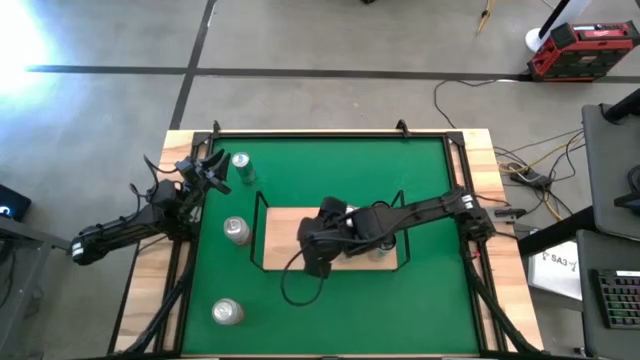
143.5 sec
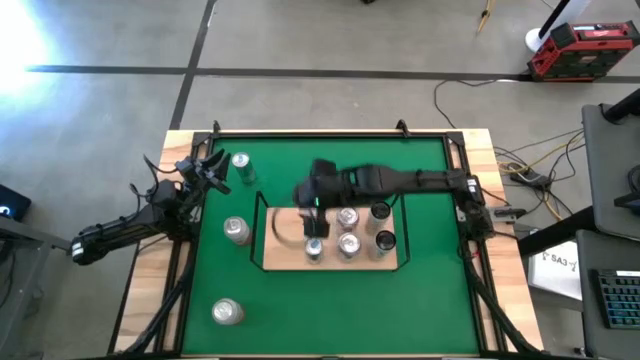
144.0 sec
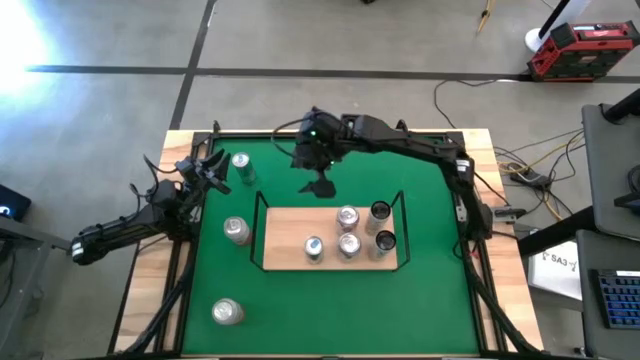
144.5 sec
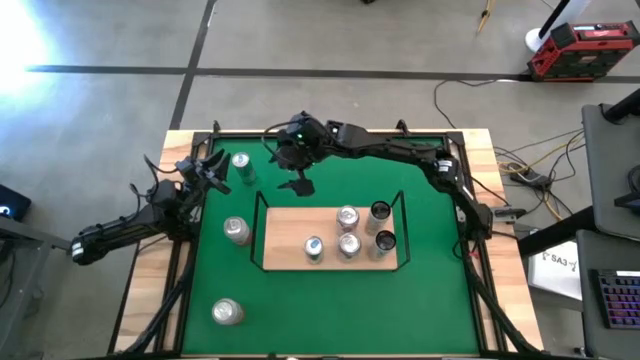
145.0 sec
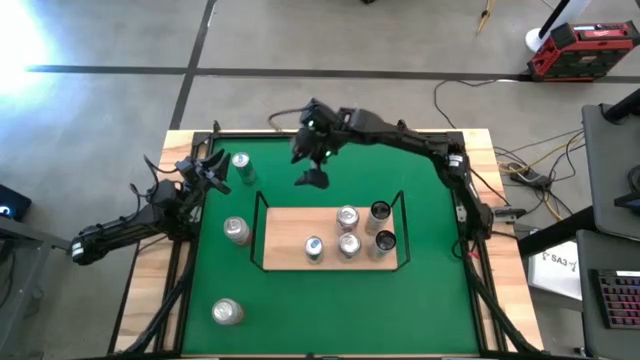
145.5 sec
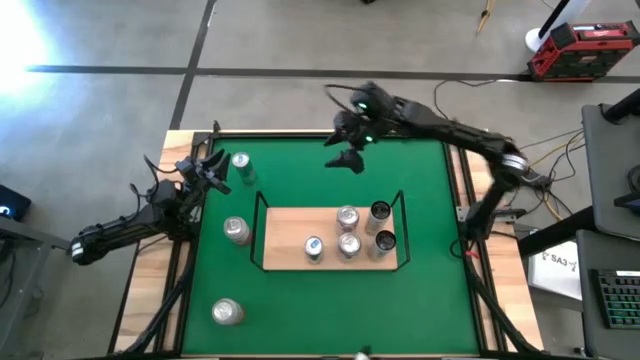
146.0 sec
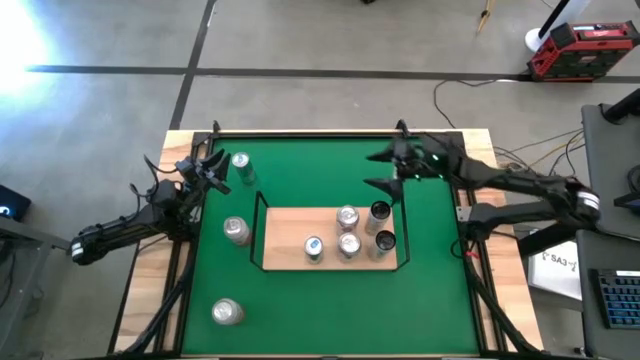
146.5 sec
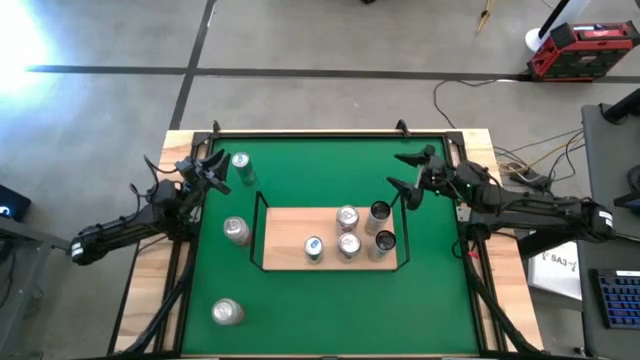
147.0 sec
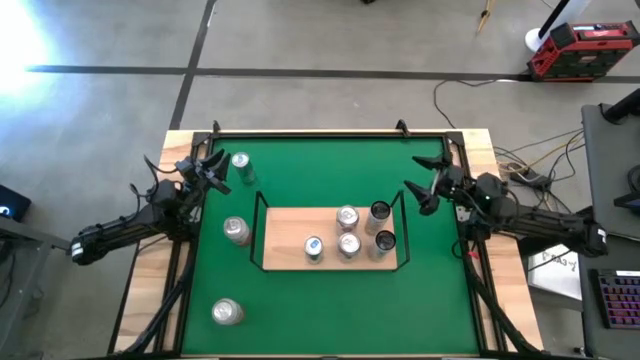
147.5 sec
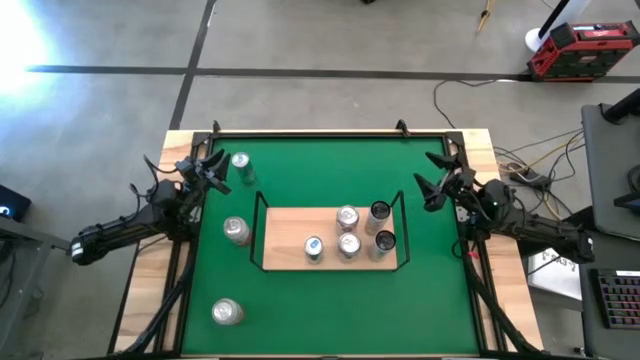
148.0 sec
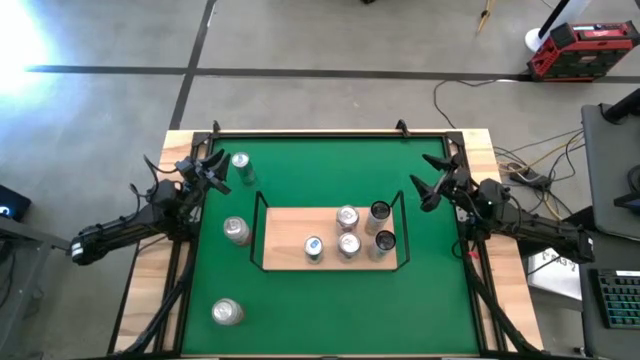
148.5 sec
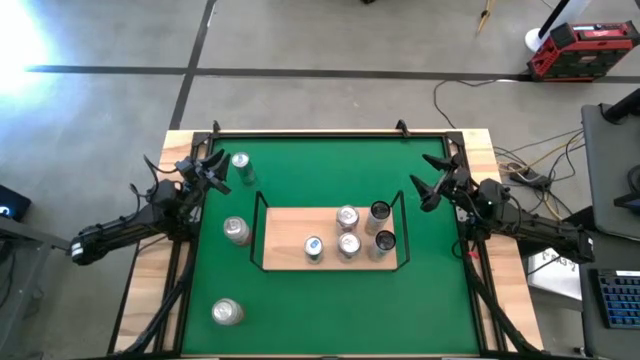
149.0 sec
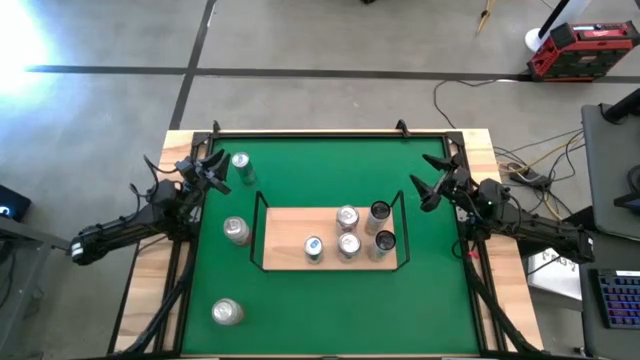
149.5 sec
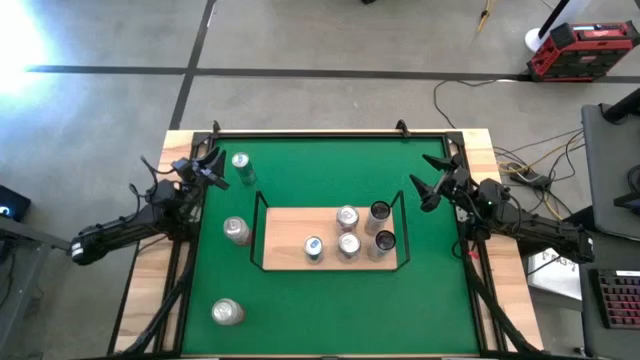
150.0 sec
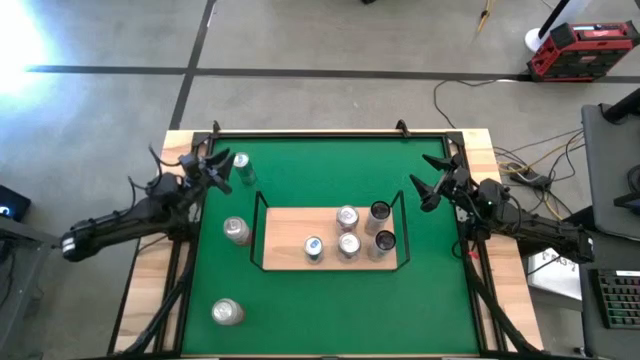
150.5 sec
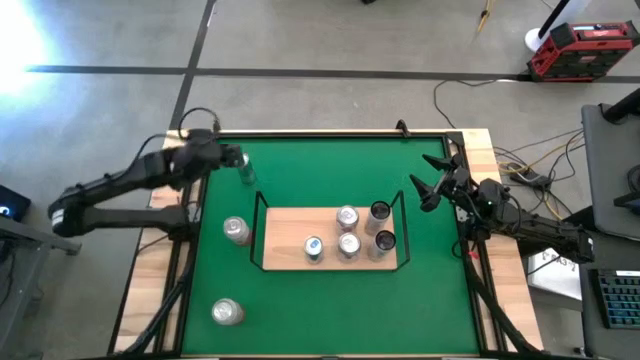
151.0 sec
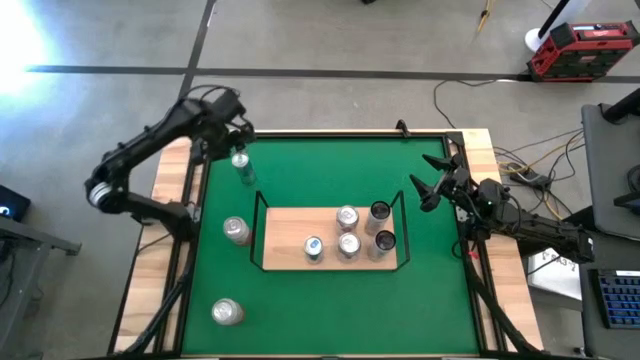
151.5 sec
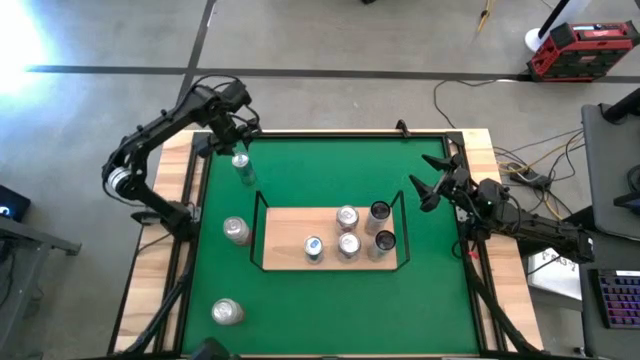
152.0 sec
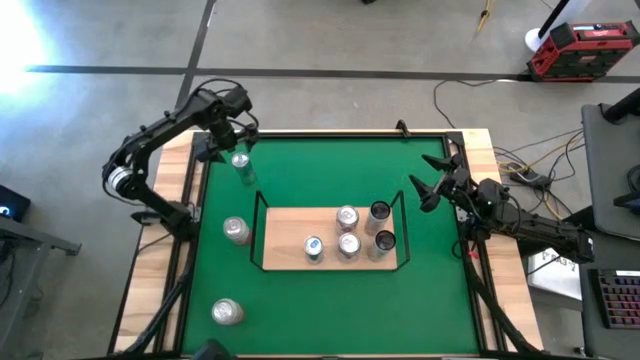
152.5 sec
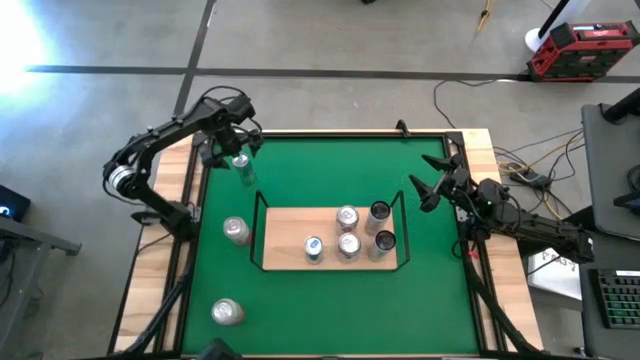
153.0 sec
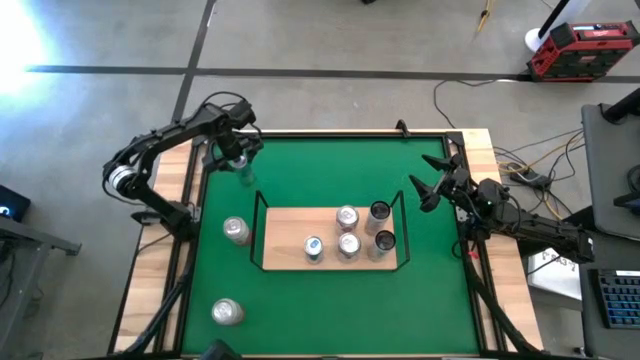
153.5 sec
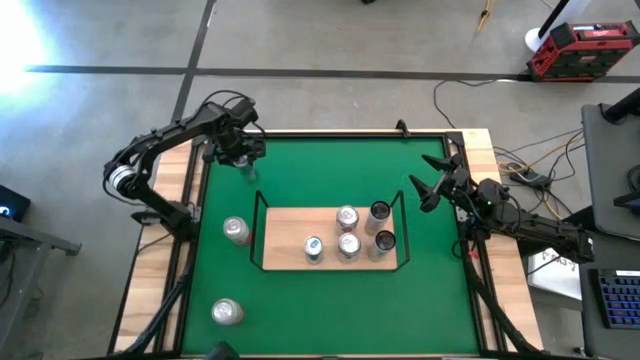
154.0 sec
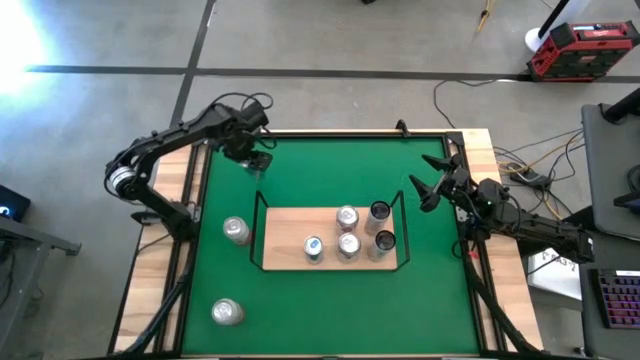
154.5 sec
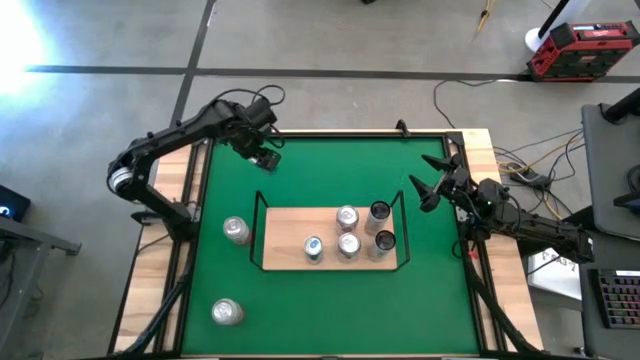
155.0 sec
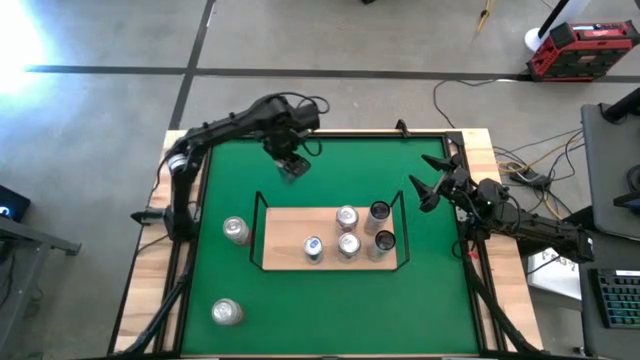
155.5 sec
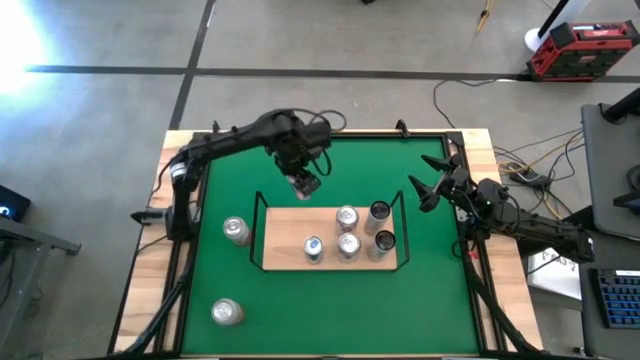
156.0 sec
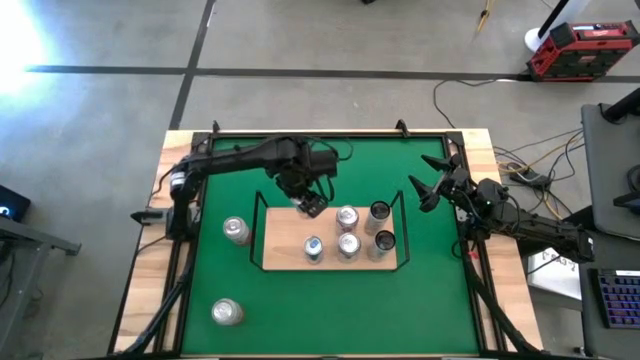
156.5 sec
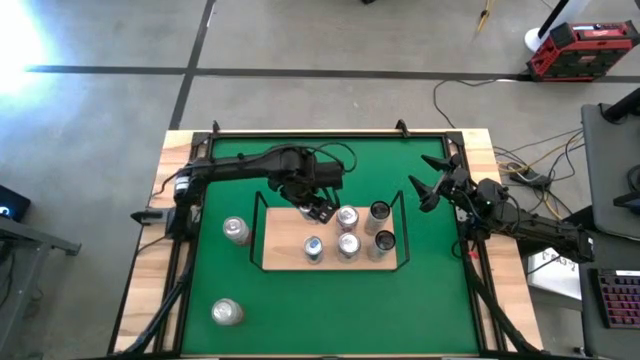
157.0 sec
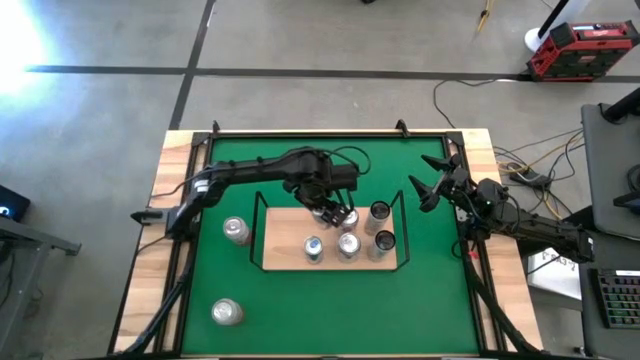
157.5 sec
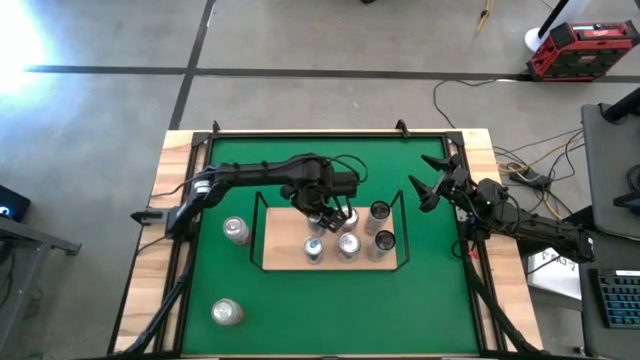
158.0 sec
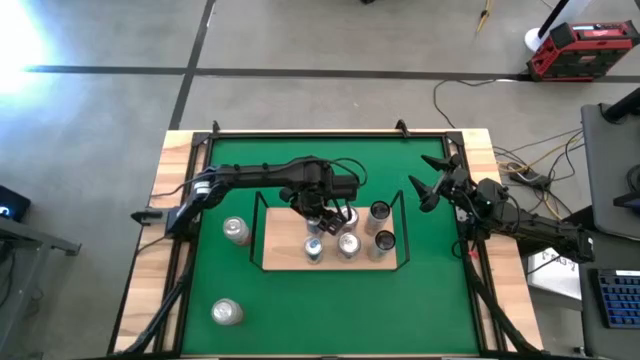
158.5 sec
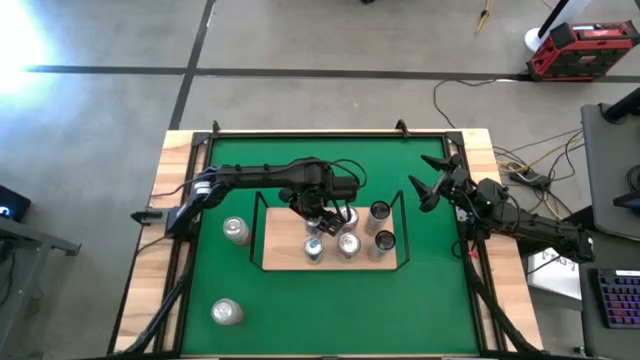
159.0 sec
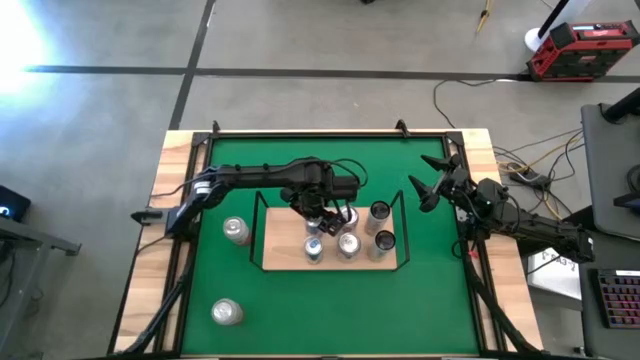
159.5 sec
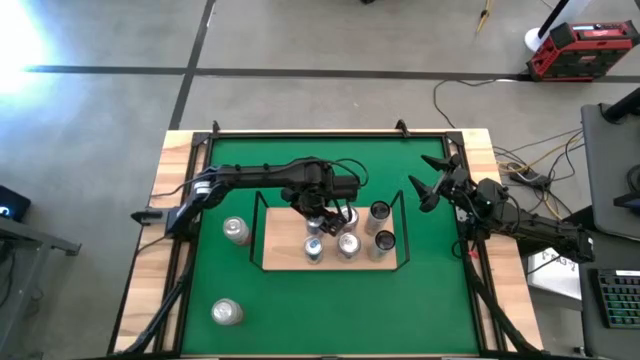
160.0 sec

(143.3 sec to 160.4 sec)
Task: Place canned beverage on shelf
Put the blue soda can on the shelf and align with the other blue soda can

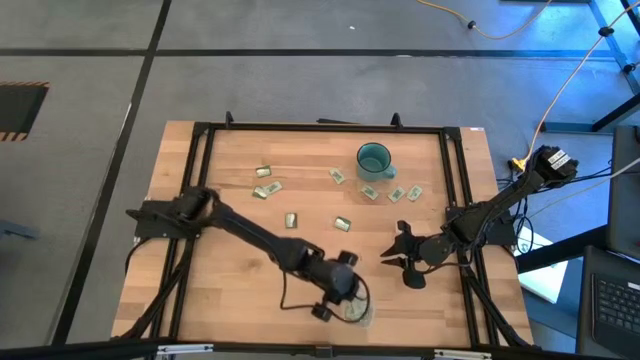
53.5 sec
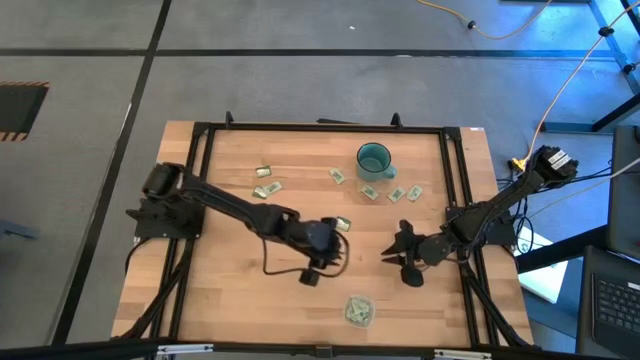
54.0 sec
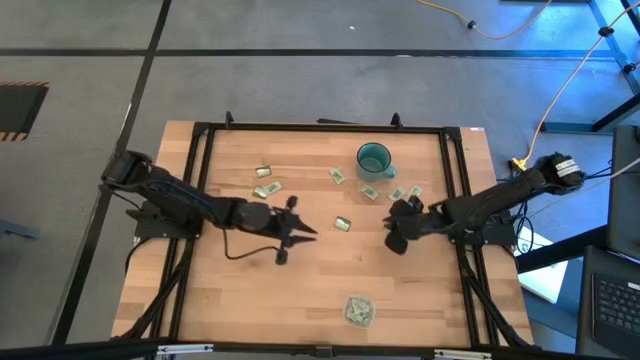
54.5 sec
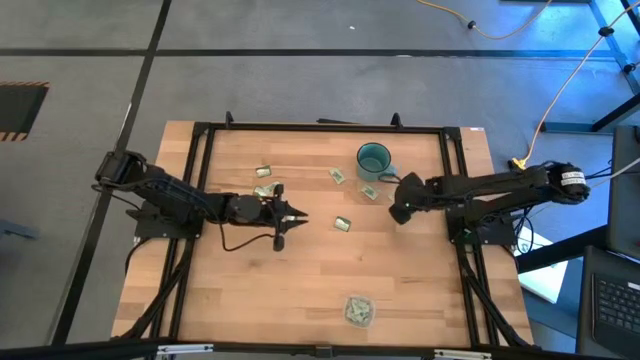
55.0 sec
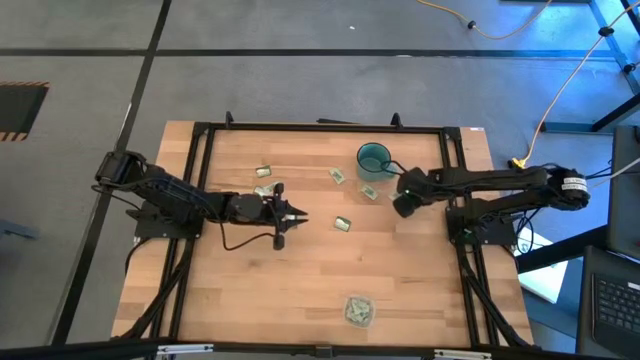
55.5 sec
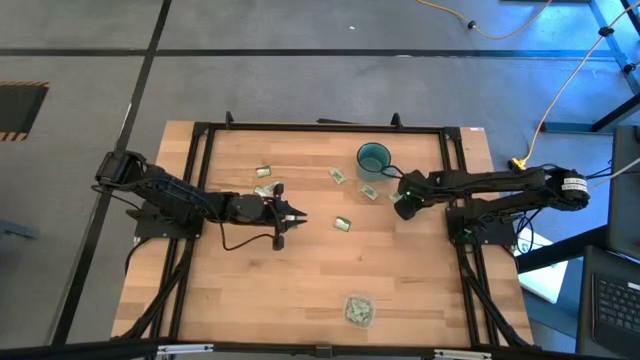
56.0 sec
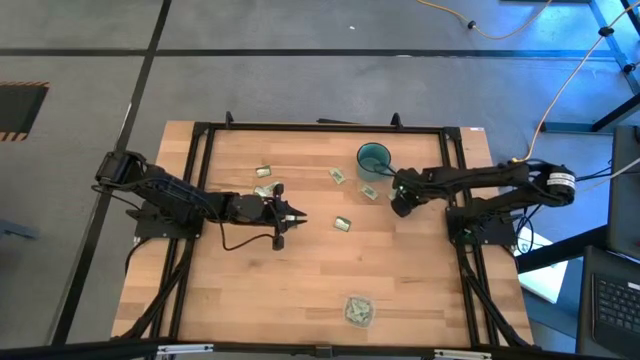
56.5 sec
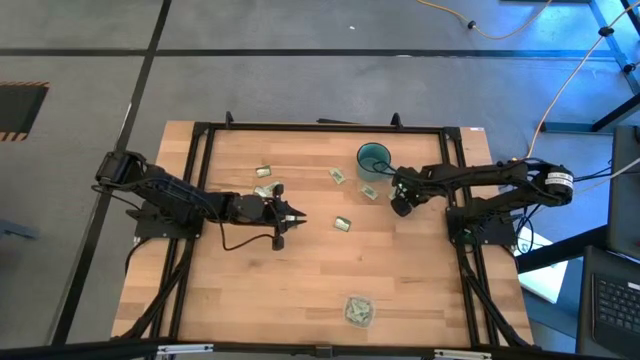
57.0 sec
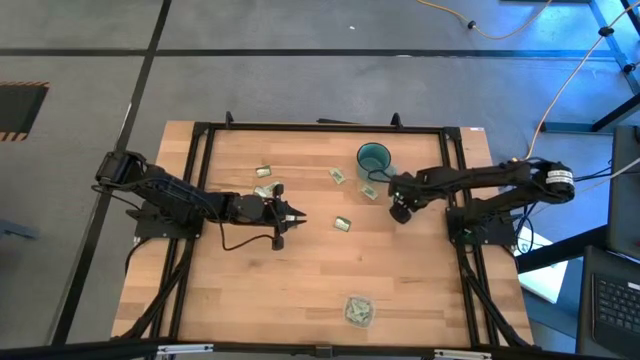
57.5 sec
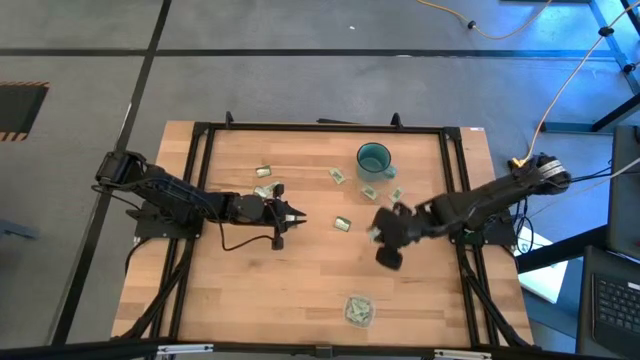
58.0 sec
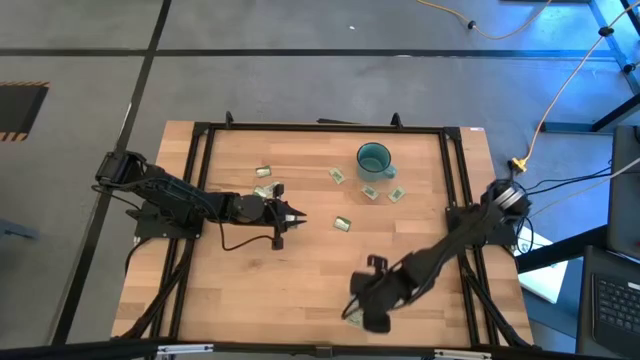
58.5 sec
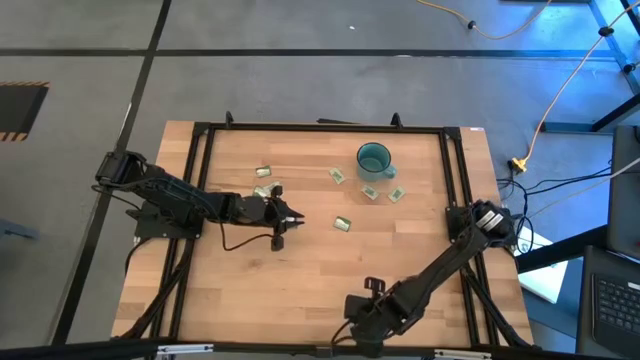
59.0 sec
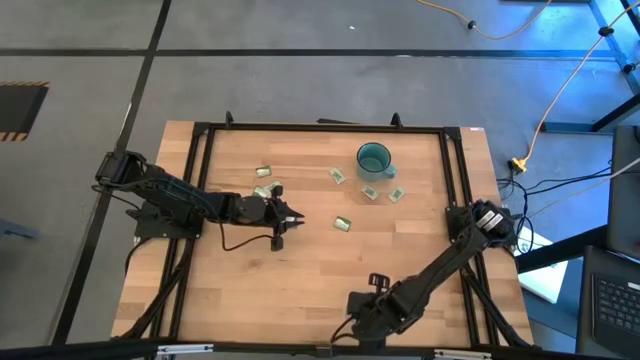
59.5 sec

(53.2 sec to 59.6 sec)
Task: Pick and place items into bin
Put the light green stevia packet into the transparent bin
